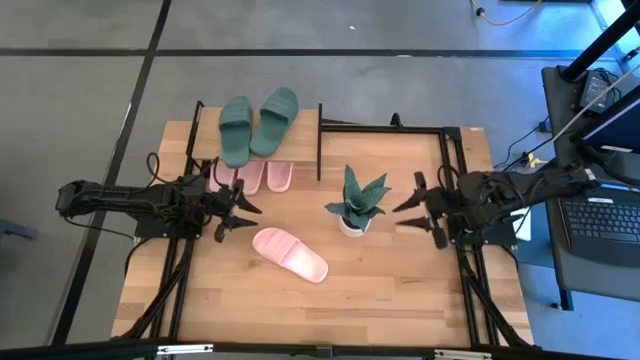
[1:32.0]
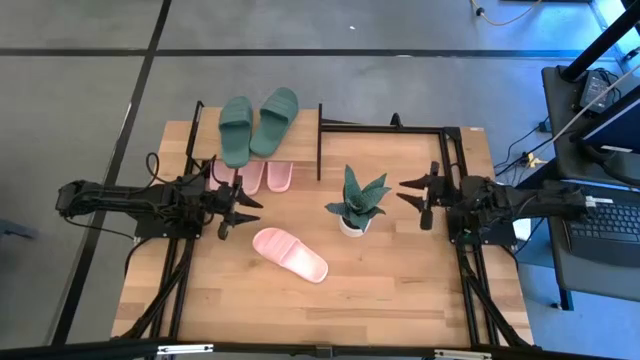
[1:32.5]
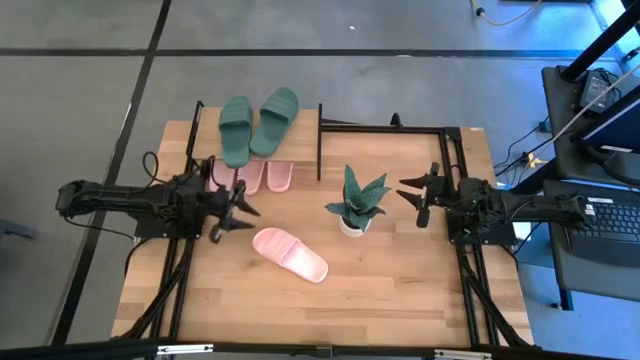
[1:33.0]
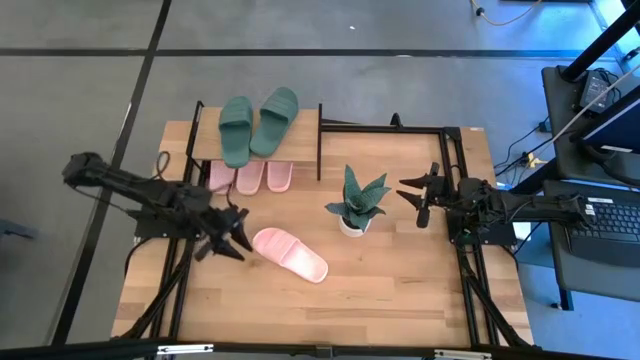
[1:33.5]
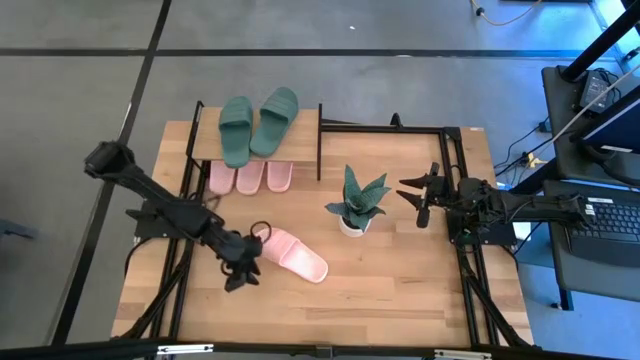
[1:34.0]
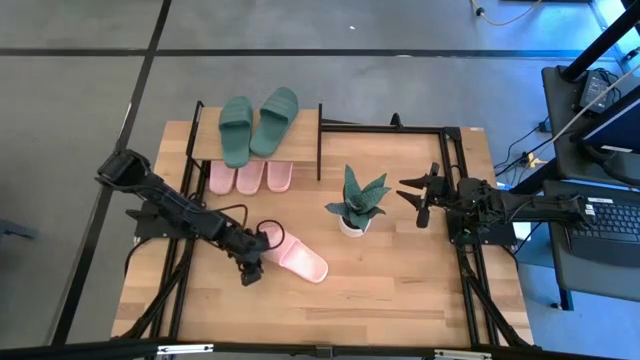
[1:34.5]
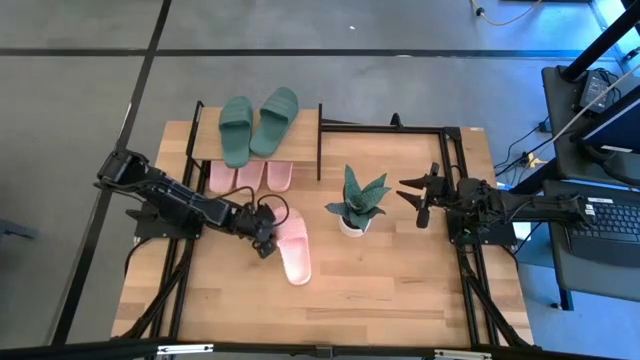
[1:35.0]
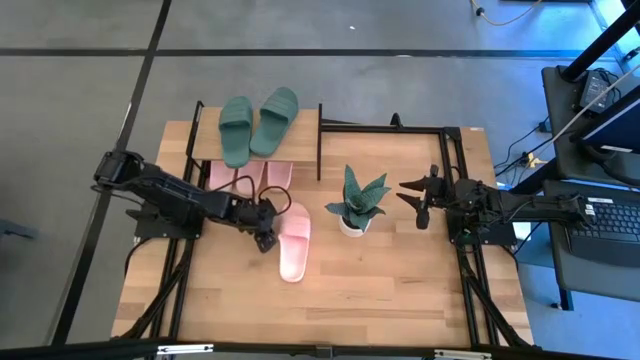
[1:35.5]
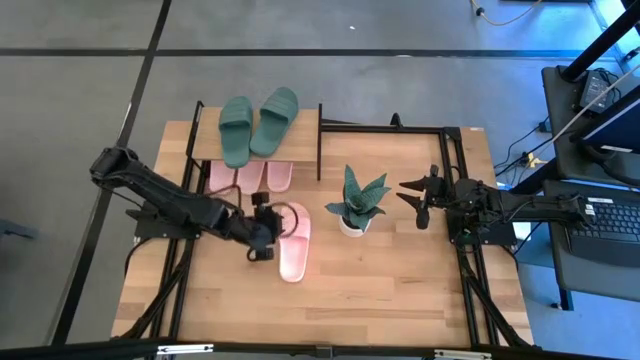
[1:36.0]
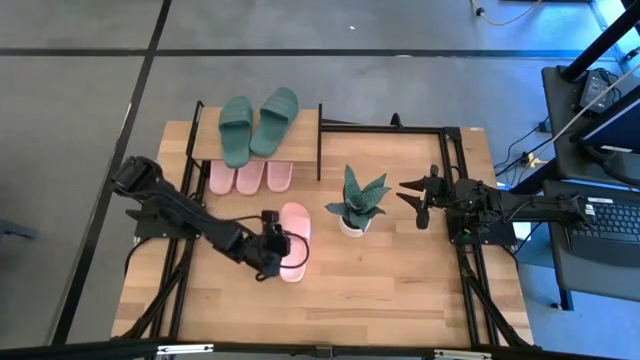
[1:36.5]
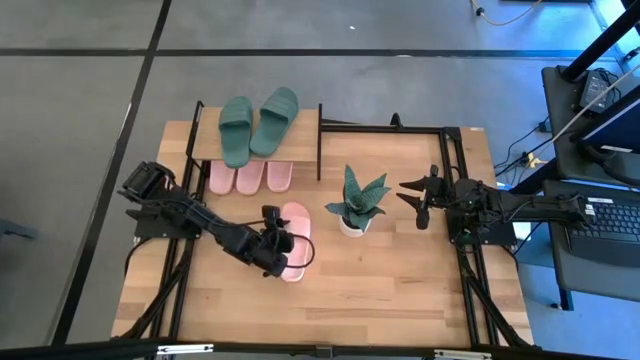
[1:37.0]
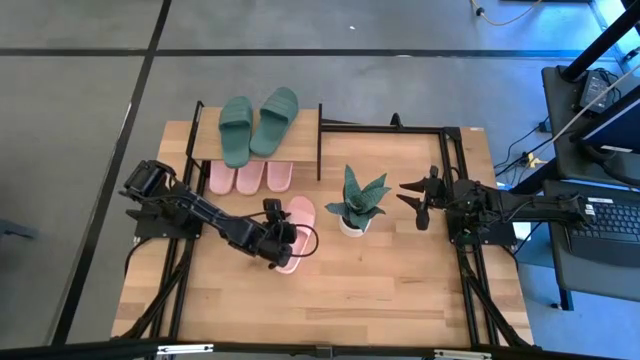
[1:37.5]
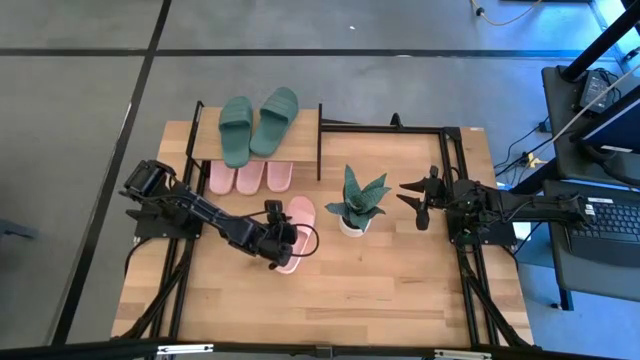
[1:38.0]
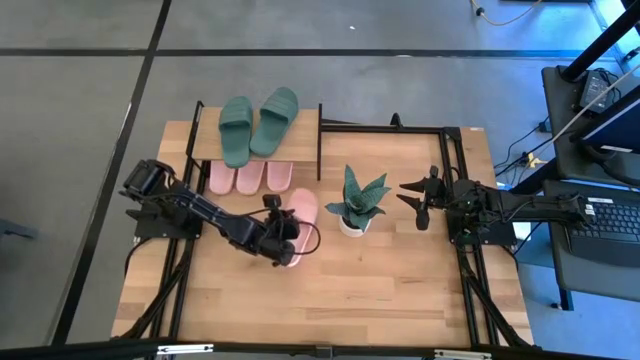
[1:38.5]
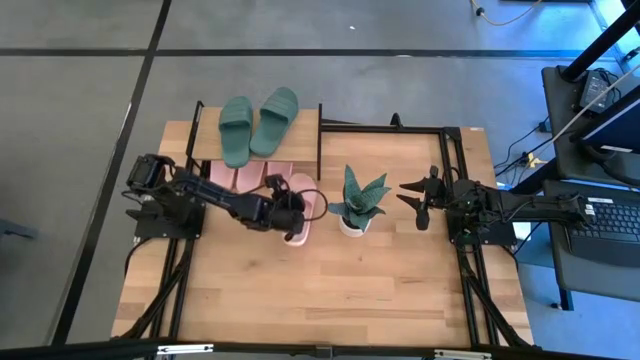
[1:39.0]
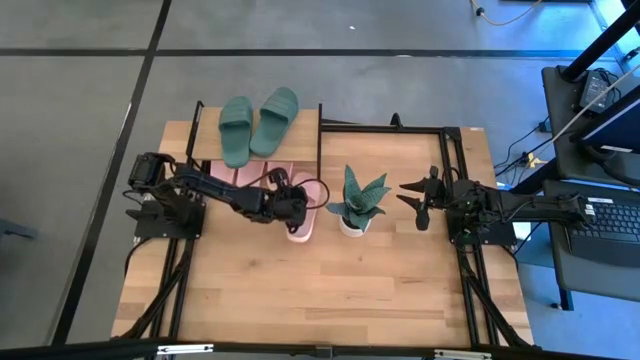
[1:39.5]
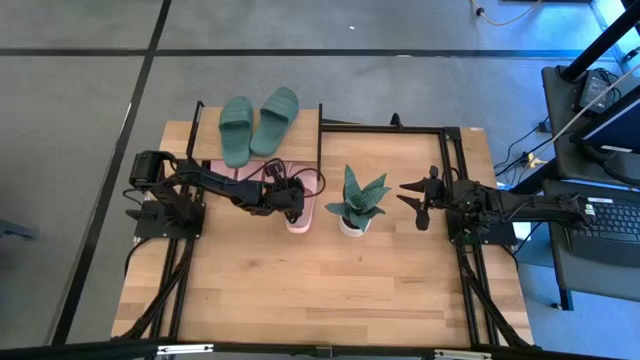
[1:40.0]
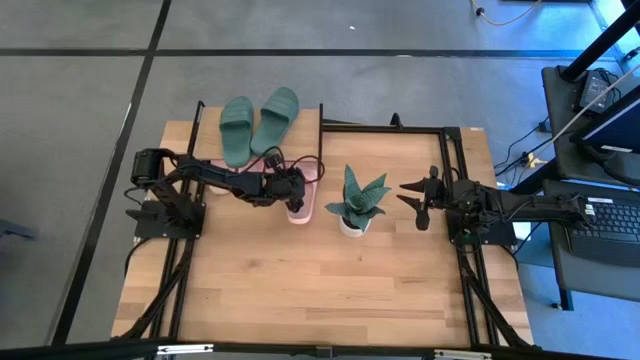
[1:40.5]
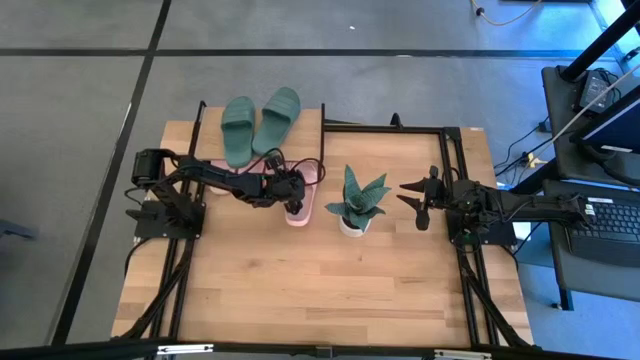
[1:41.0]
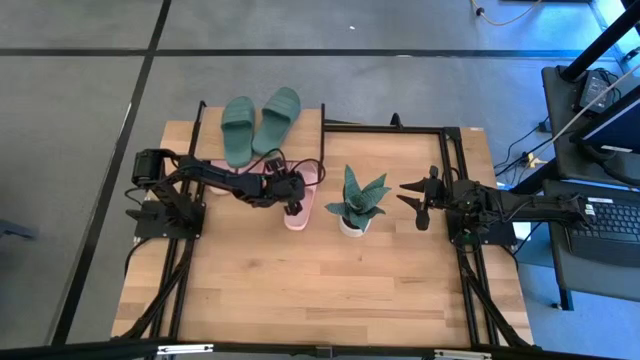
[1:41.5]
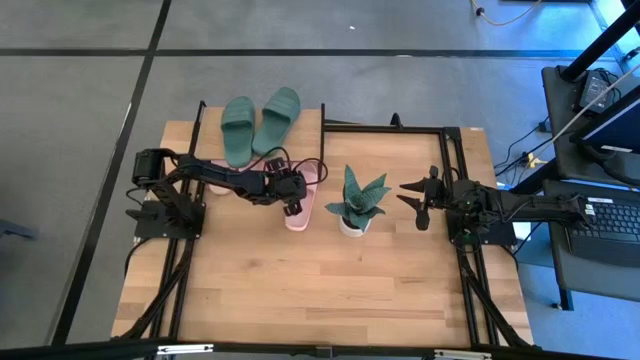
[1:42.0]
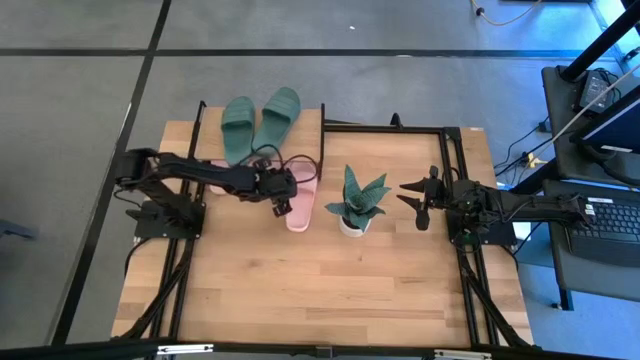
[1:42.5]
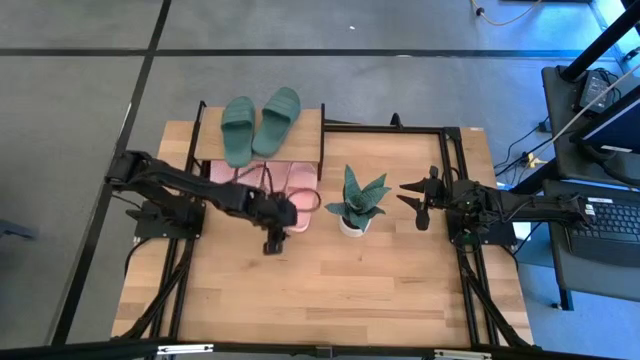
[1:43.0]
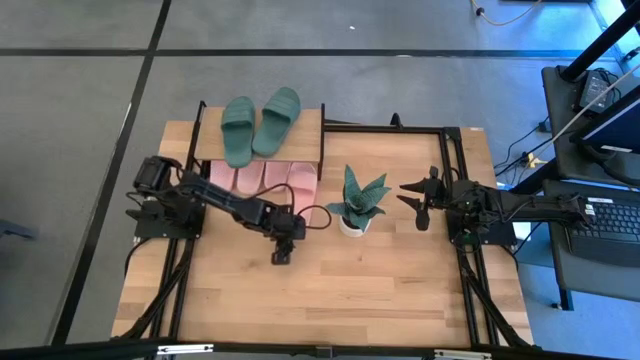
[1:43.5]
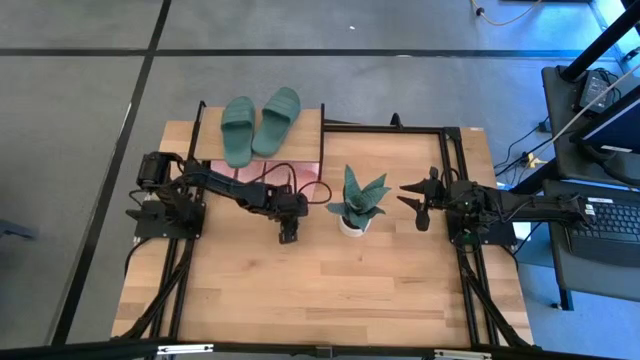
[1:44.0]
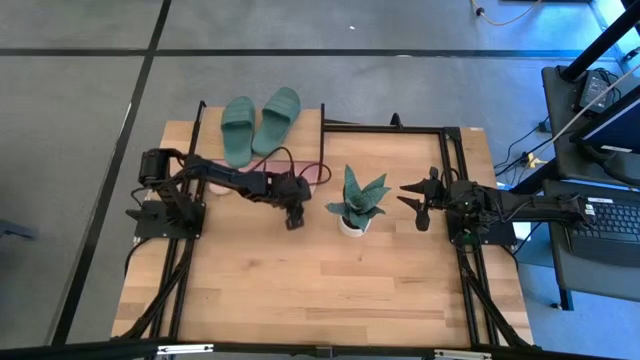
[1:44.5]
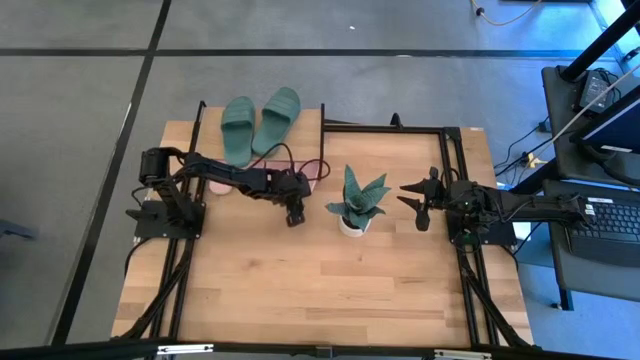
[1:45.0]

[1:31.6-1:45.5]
Task: Pick and place slides into the shelf
Put the pink slipper under the shelf

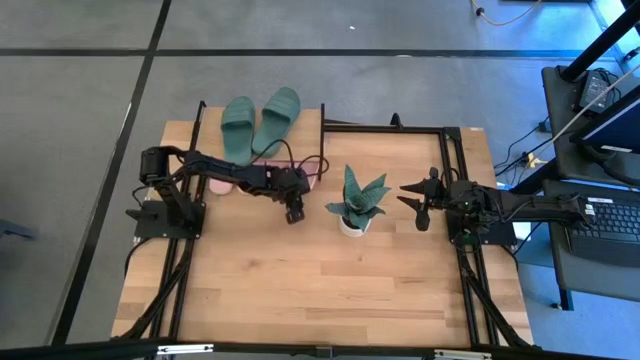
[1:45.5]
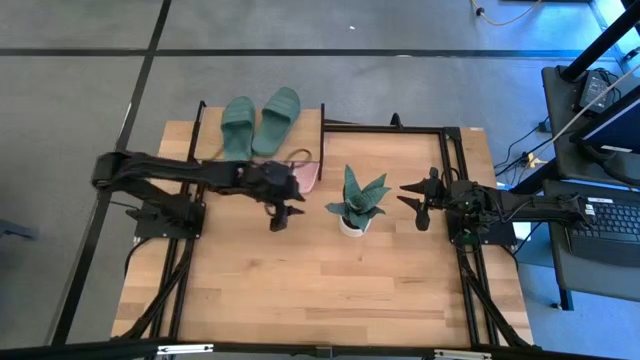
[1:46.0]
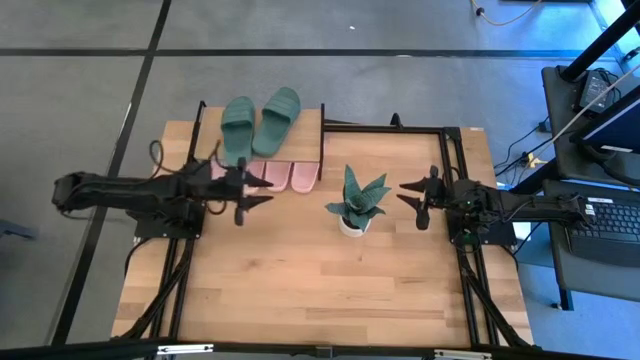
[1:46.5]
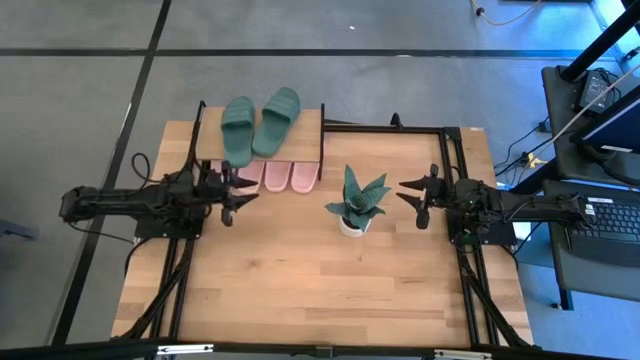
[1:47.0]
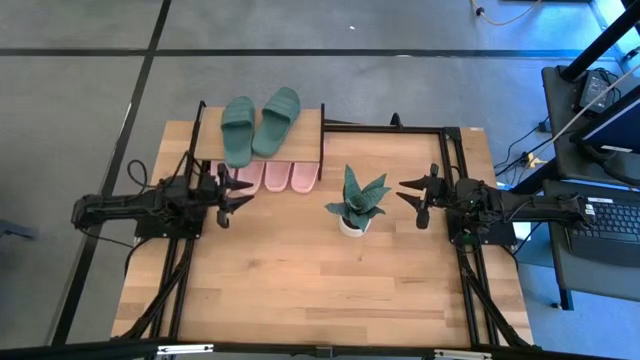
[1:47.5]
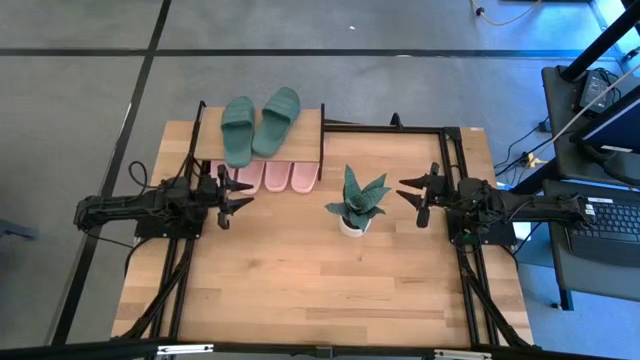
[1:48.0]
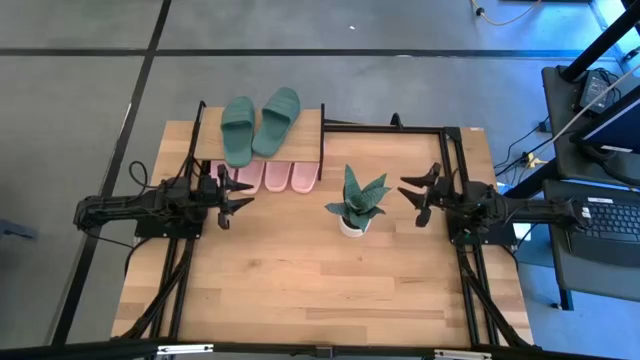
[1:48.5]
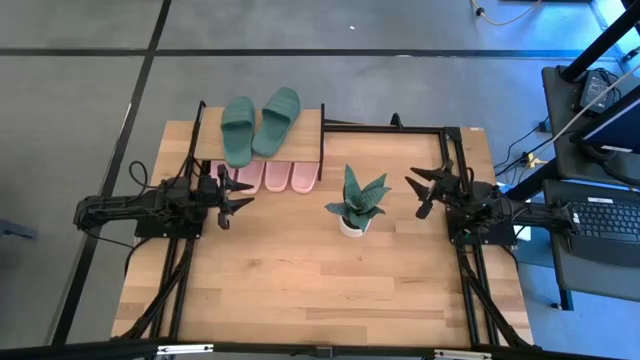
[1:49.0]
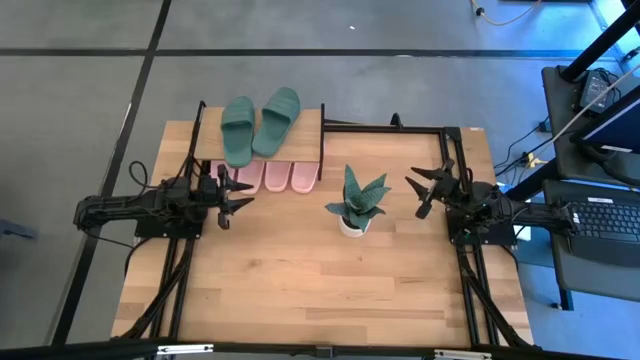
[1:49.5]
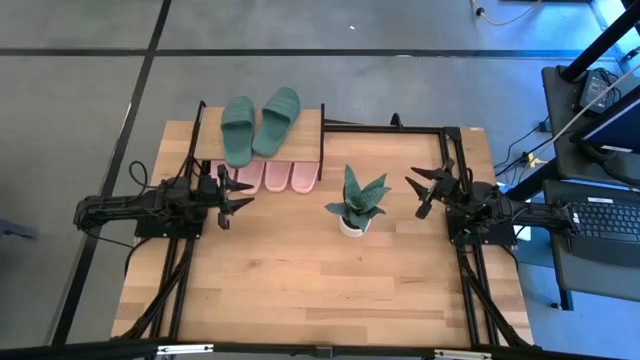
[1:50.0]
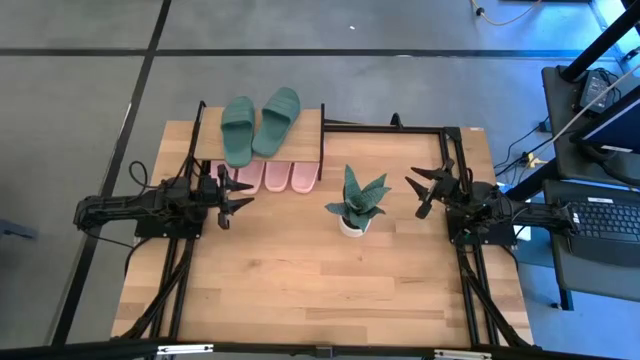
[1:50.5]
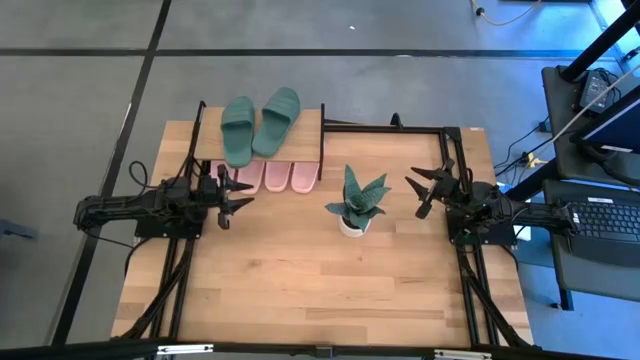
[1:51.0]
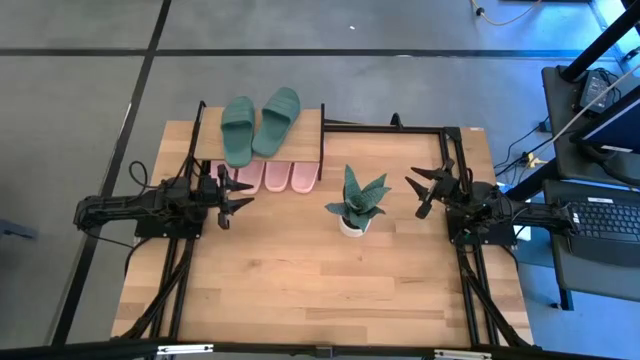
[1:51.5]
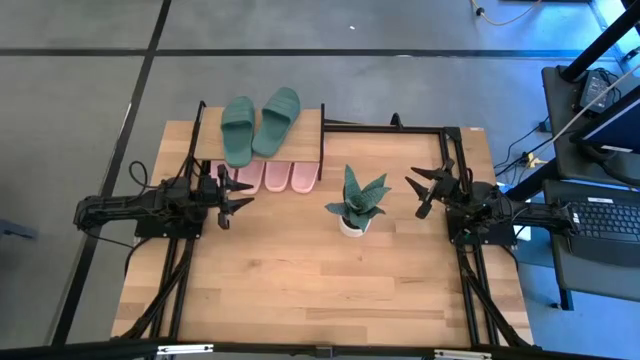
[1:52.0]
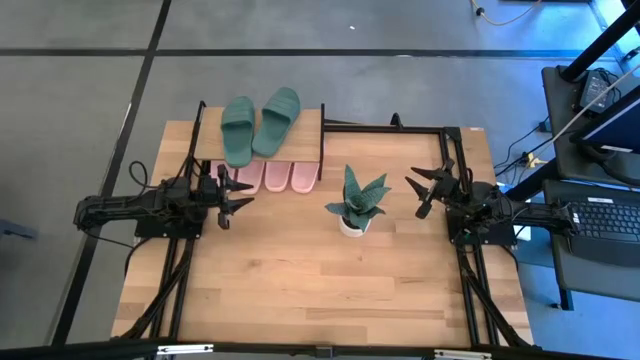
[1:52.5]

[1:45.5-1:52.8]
Return to Home Position

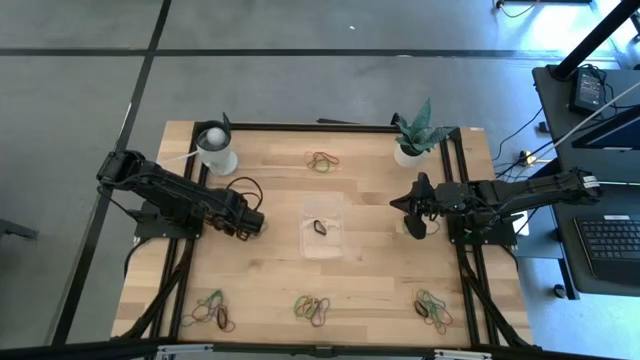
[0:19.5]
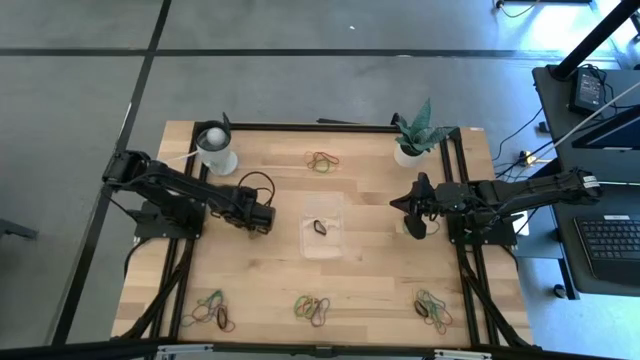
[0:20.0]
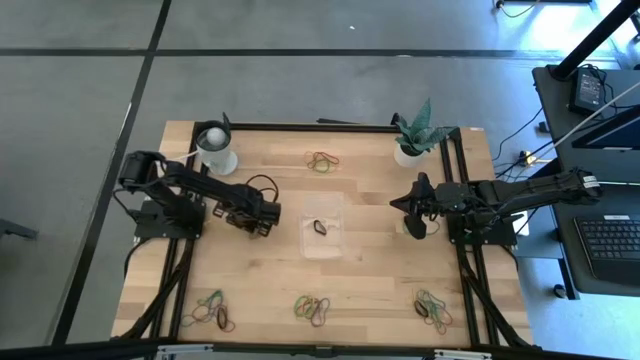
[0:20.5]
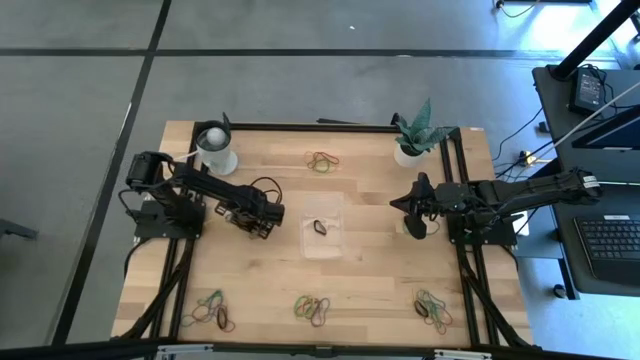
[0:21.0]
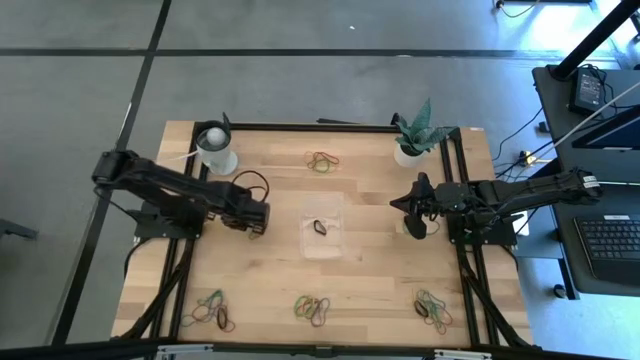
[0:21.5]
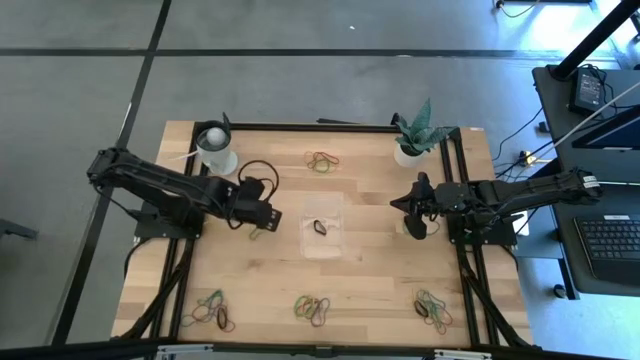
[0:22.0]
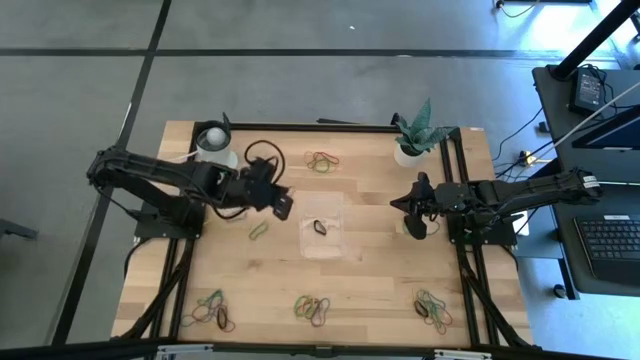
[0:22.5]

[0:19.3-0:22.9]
Task: Pick and place rubber bands into bin
Put the red rubber band into the transparent bin
